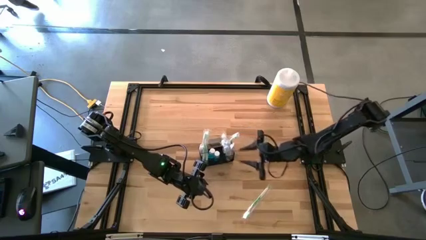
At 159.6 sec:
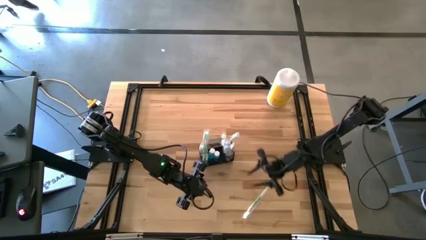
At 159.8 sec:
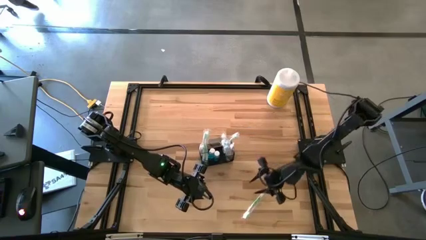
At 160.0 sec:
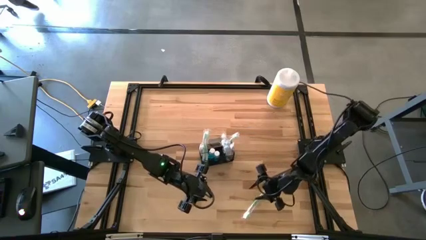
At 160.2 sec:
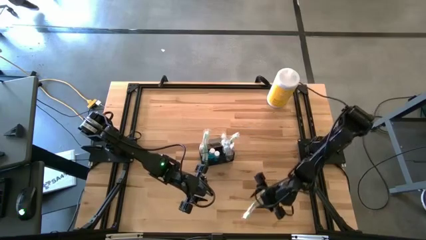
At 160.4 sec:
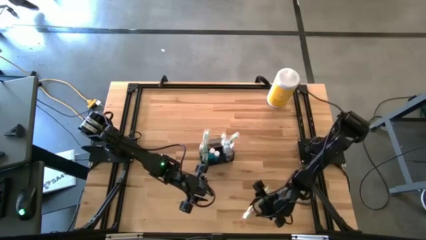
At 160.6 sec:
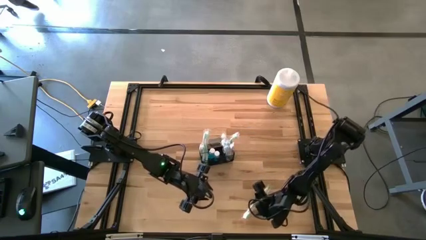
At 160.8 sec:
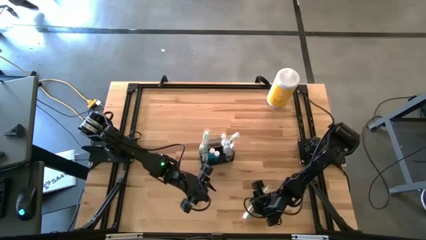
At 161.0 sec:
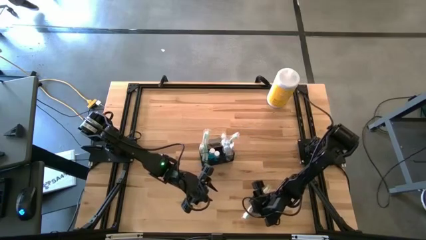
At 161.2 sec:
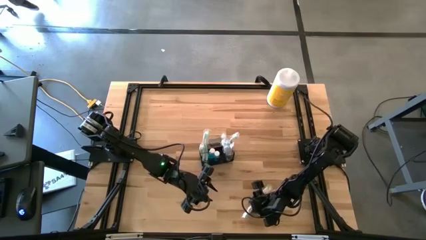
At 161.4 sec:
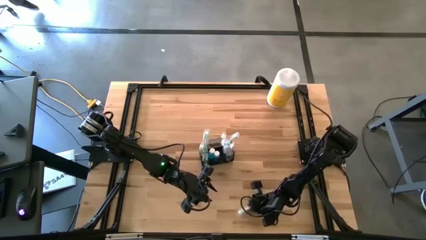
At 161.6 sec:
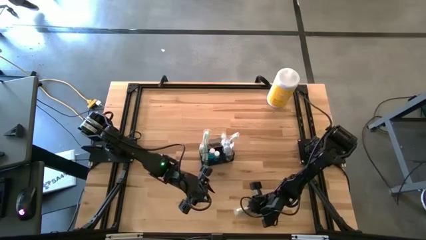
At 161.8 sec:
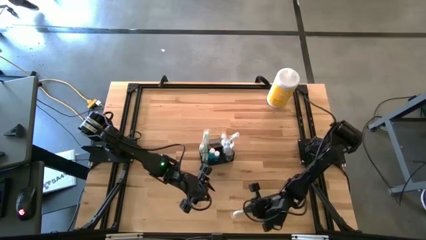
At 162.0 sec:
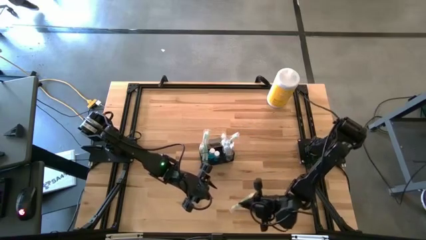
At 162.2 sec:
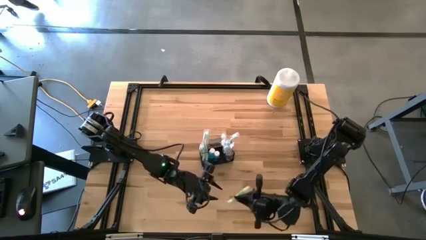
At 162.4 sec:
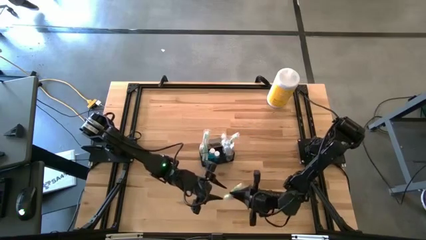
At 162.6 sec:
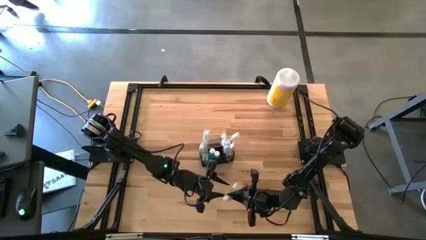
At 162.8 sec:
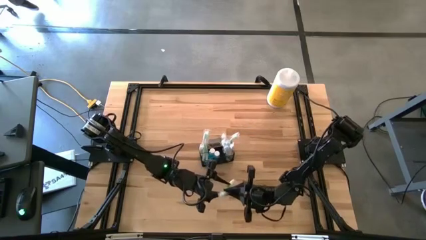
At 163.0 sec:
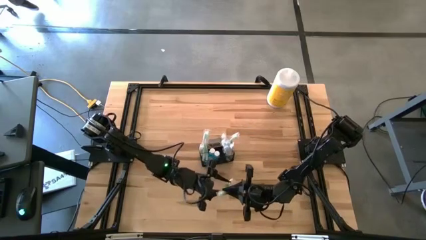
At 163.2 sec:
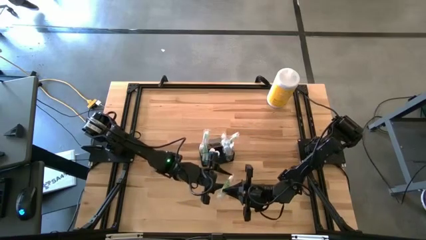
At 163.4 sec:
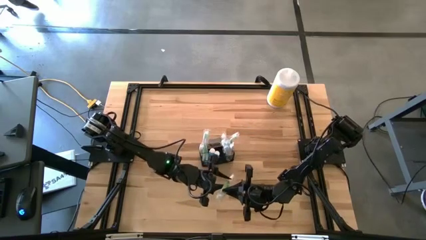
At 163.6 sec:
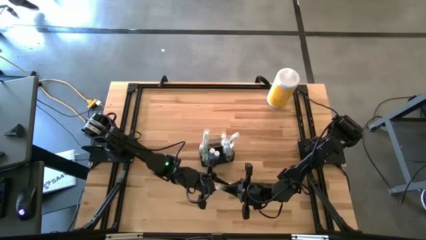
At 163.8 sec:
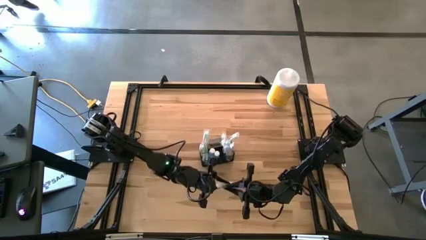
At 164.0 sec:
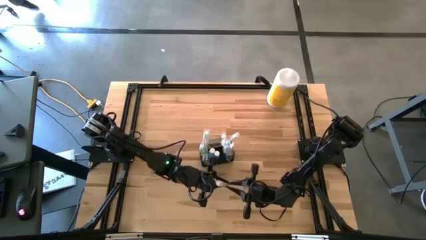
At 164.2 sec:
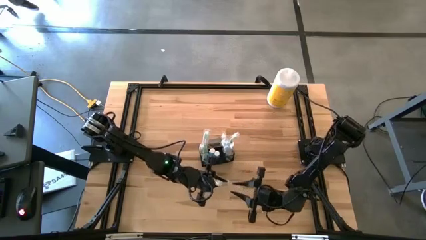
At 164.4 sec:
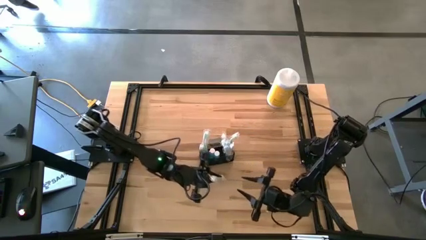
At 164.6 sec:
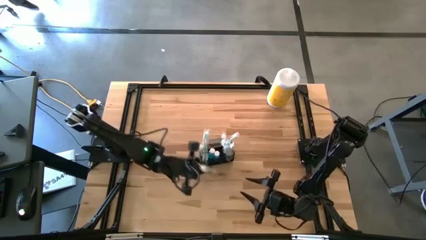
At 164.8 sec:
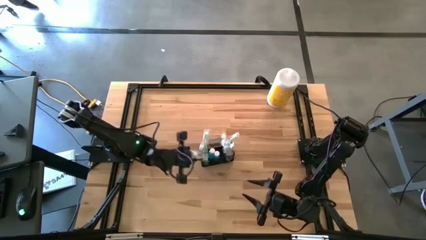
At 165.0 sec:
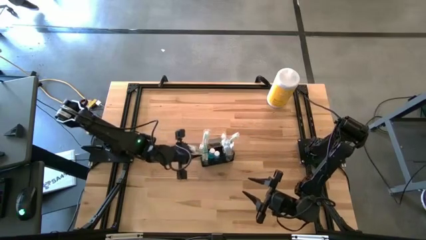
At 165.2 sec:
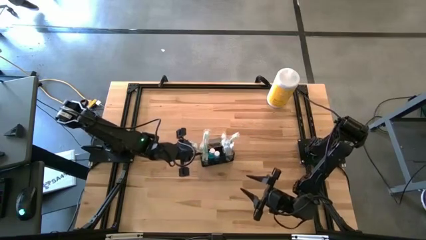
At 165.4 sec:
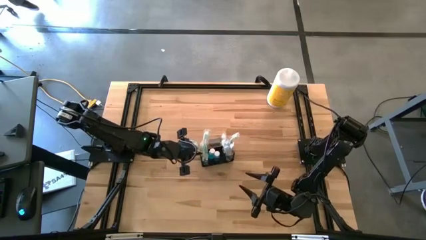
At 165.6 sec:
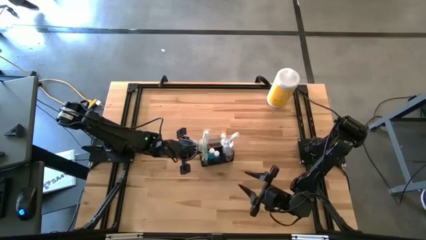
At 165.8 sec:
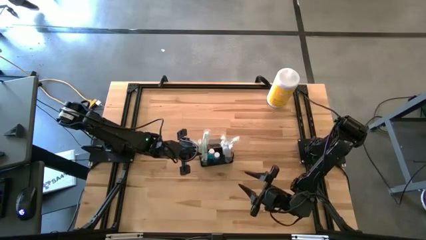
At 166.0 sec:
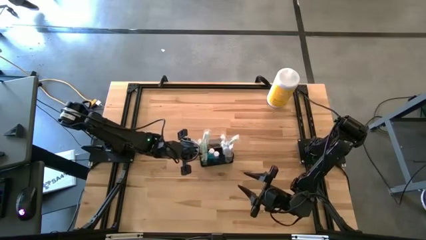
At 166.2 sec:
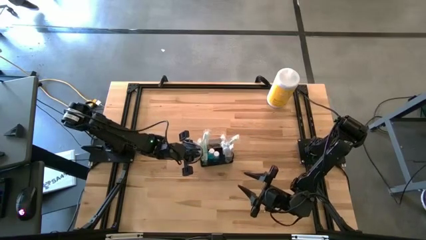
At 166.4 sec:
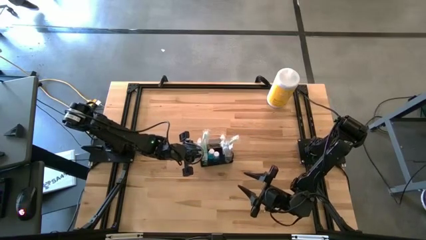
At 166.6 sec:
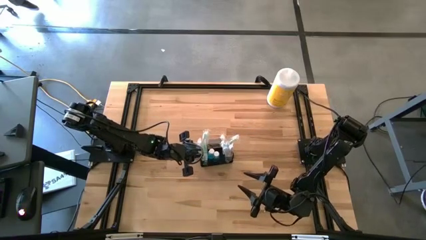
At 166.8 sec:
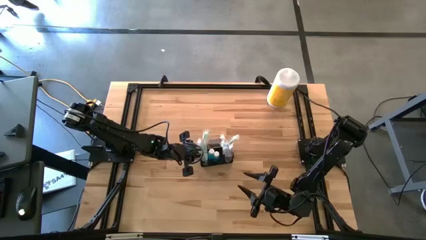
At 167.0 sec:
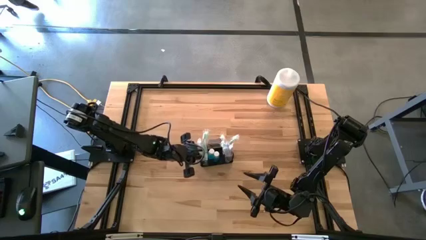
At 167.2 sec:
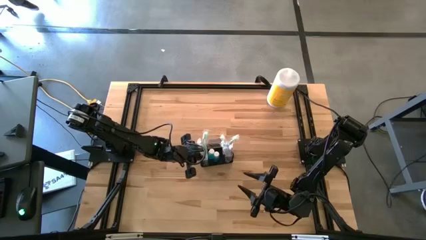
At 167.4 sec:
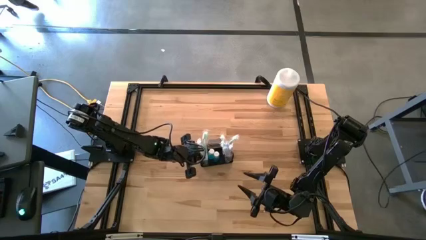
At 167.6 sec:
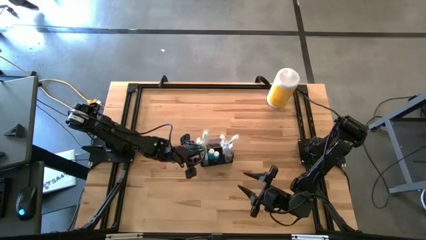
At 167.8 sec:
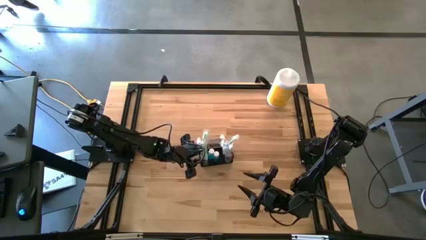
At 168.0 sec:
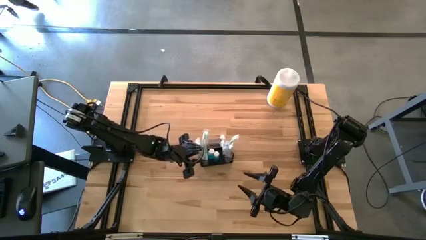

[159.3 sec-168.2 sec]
Task: Pick & Place toothbrushing station
Put the green toothbrush into the black mesh organizer

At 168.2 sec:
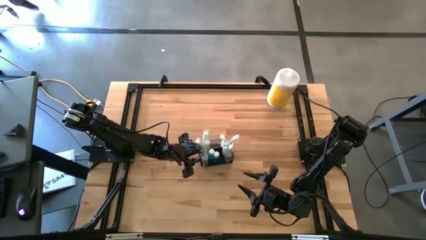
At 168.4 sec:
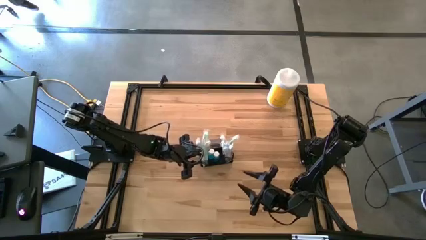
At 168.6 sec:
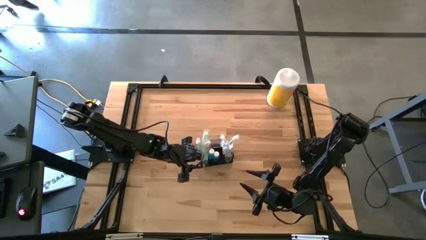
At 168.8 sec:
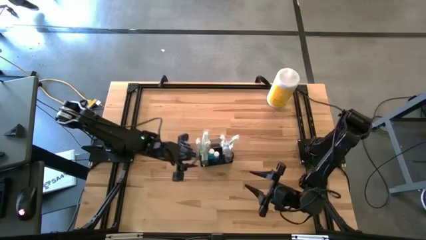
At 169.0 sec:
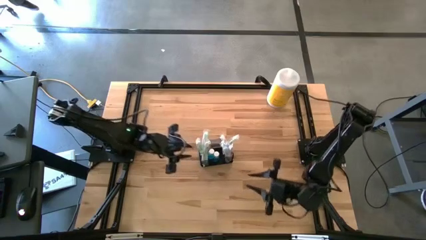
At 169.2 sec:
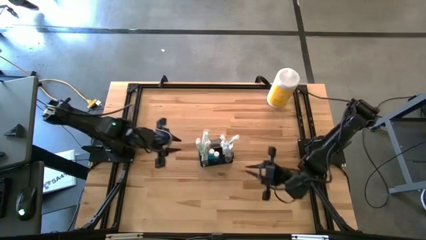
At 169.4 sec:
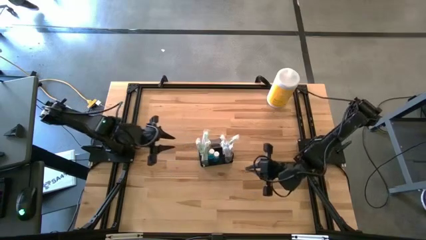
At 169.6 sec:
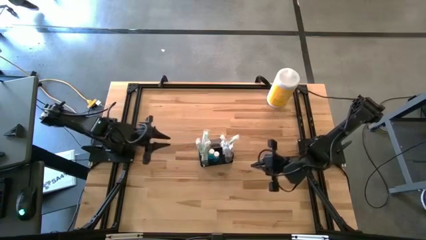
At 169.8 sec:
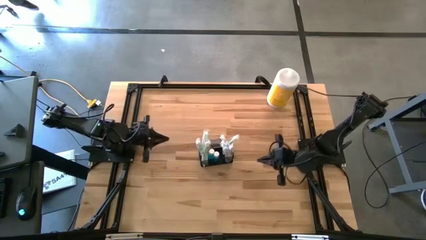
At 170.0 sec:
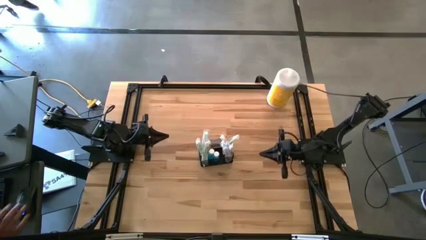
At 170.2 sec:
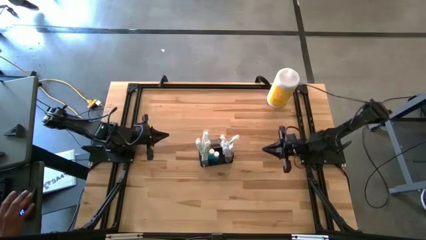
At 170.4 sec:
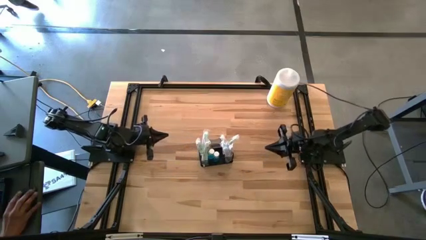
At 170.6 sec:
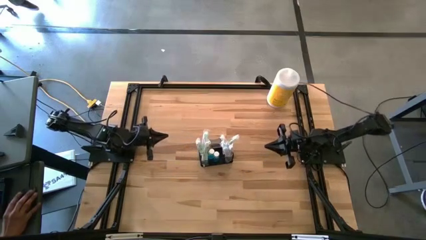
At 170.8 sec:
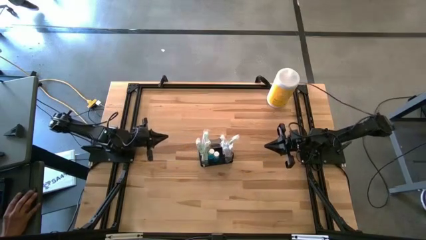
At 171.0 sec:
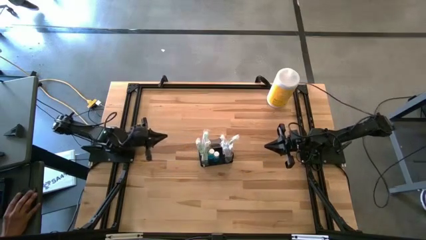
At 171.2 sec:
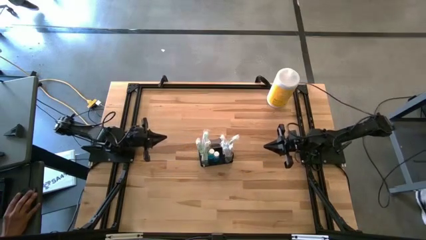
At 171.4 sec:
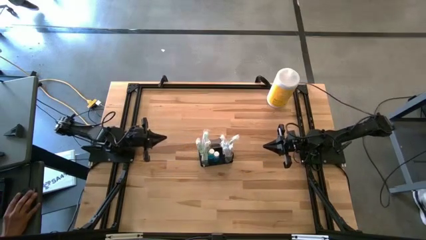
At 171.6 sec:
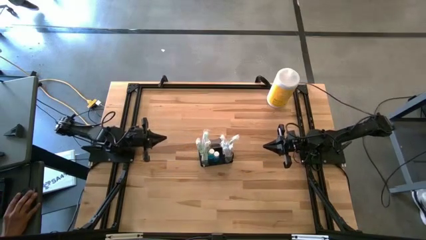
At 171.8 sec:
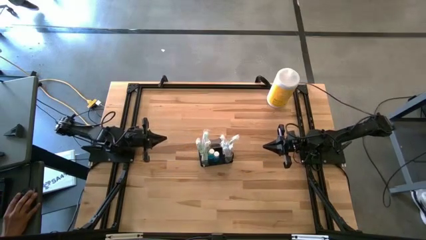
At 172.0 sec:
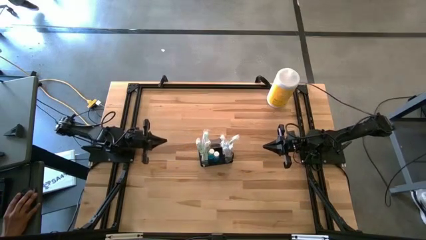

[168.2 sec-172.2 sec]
Return to Home Position

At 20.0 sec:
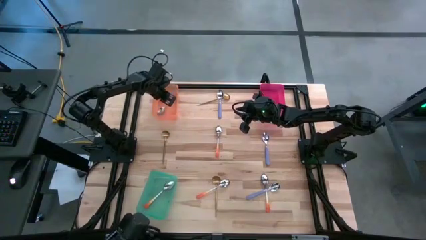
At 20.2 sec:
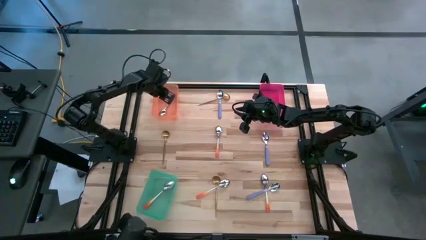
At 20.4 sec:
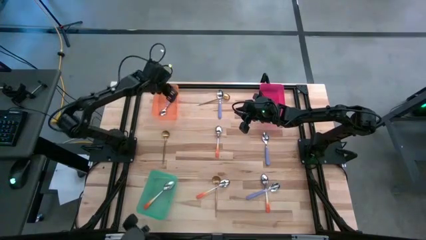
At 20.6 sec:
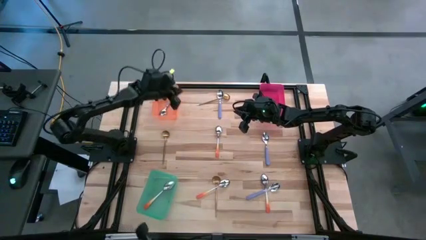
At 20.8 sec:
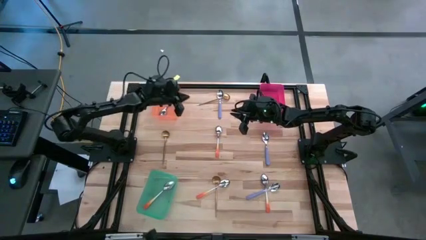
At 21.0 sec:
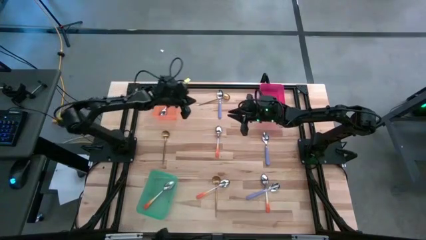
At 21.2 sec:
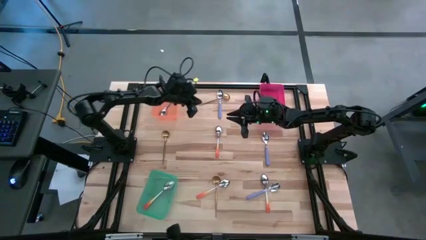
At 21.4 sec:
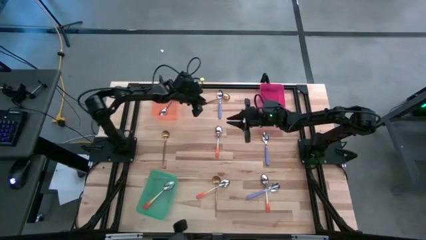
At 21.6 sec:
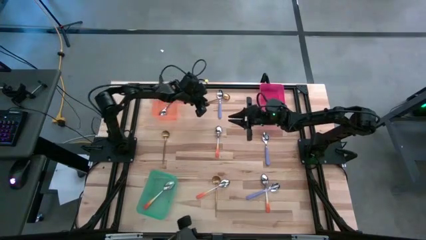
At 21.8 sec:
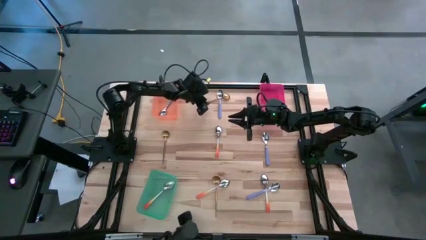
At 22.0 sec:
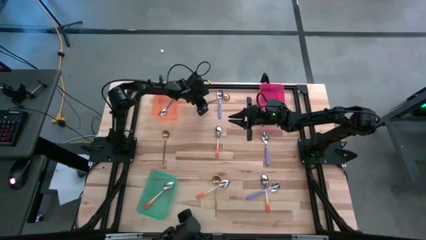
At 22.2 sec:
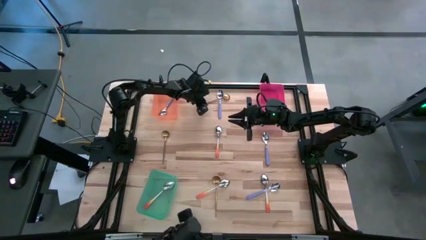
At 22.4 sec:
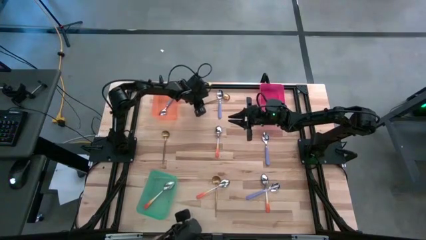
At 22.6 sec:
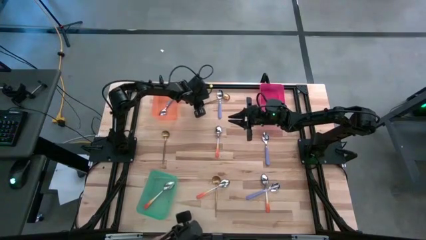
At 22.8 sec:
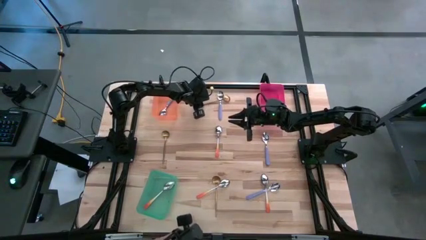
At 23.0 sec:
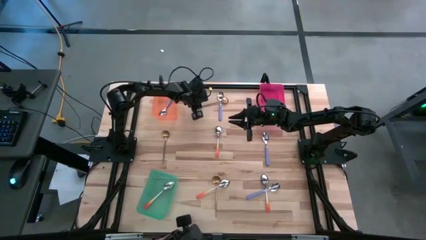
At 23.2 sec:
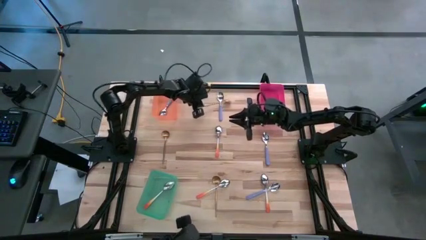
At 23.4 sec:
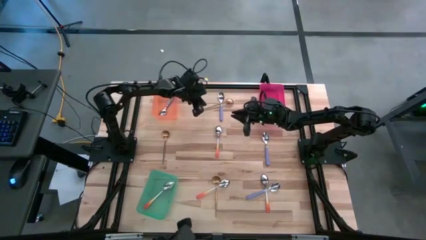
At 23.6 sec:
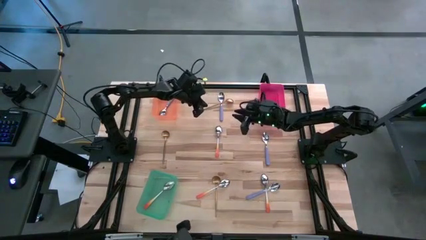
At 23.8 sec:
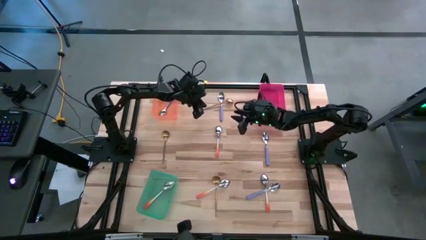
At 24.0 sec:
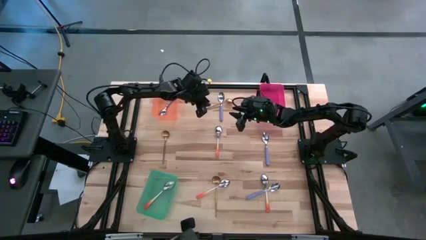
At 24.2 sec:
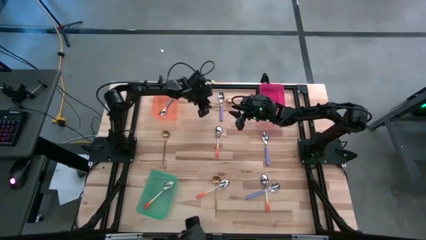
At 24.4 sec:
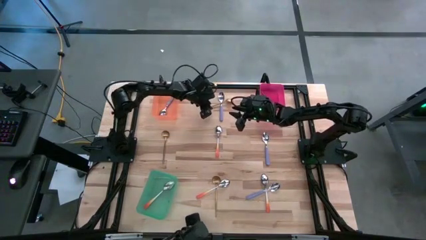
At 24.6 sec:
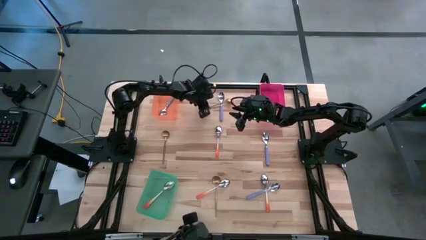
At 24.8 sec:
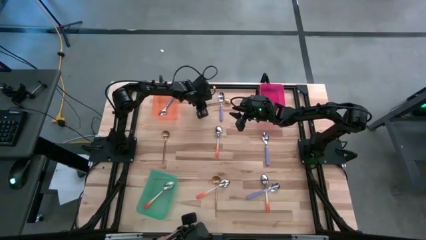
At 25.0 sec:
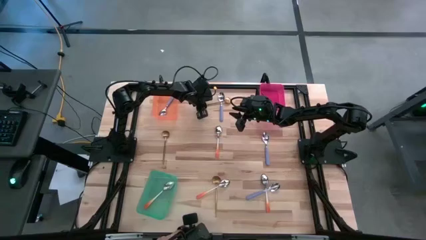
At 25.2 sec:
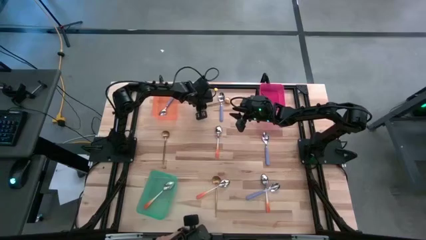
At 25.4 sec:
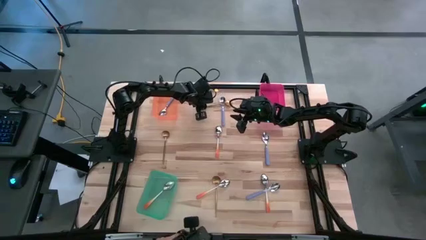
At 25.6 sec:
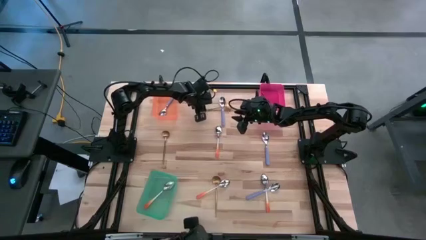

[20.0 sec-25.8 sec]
Task: Sort silverware by color (type)
Put the gold spoon into the pink bin
